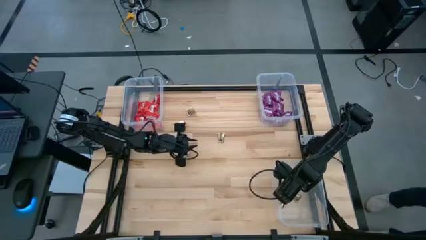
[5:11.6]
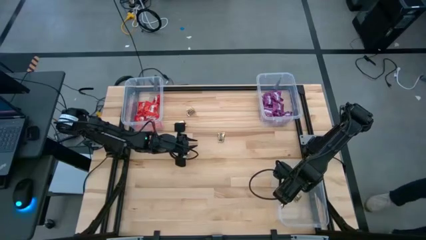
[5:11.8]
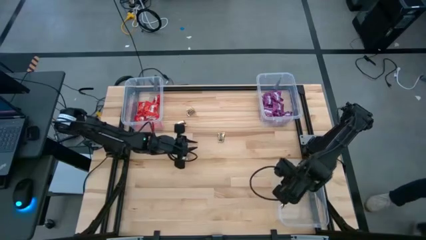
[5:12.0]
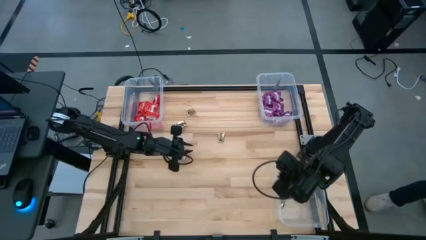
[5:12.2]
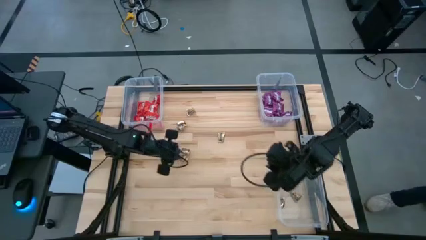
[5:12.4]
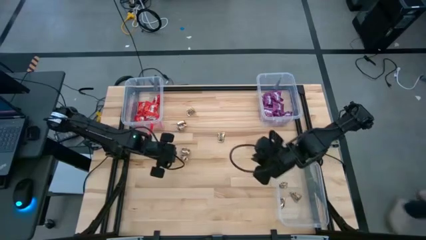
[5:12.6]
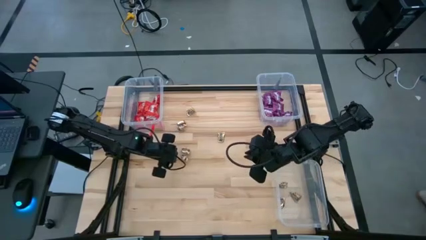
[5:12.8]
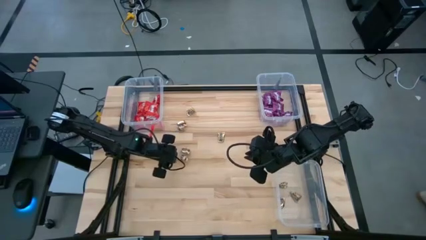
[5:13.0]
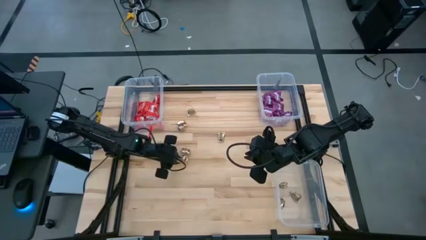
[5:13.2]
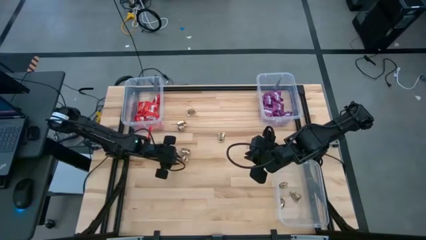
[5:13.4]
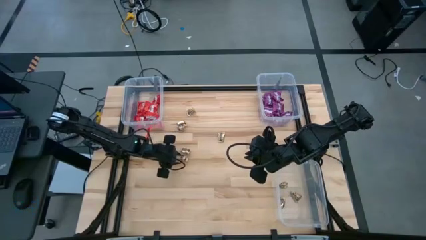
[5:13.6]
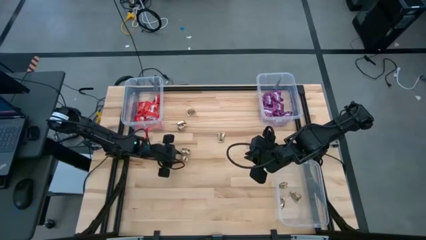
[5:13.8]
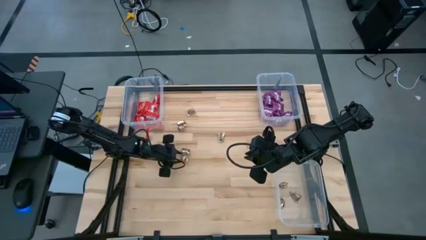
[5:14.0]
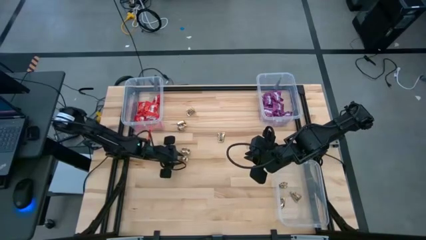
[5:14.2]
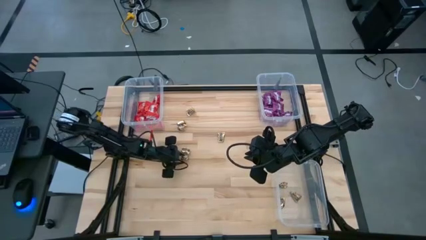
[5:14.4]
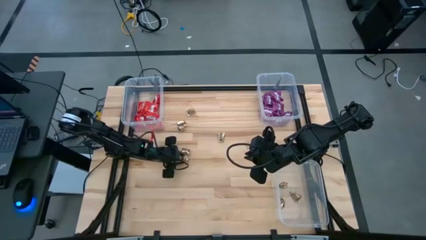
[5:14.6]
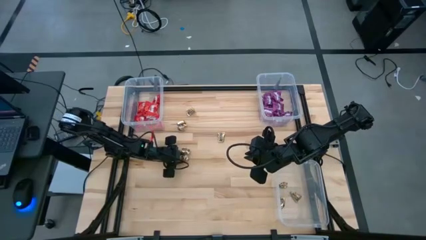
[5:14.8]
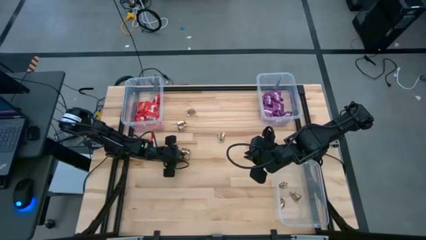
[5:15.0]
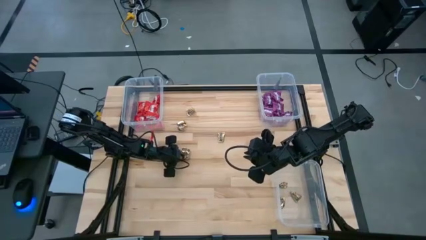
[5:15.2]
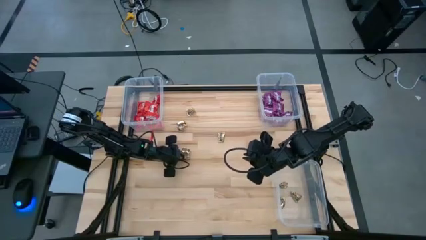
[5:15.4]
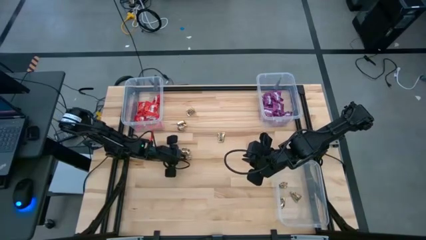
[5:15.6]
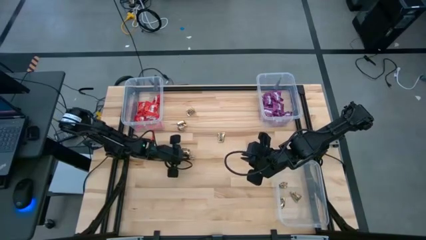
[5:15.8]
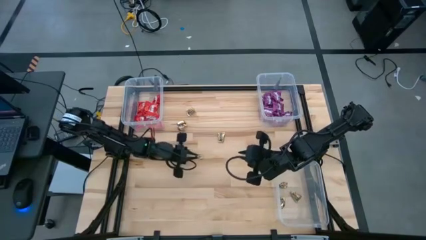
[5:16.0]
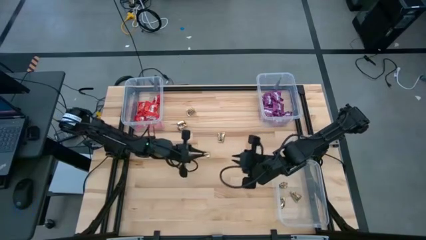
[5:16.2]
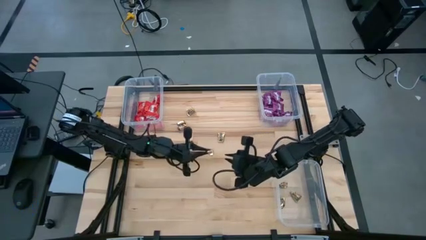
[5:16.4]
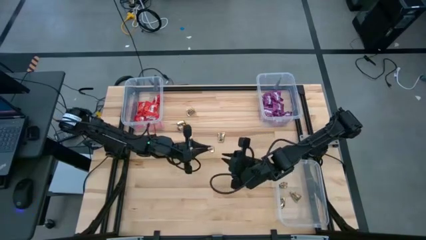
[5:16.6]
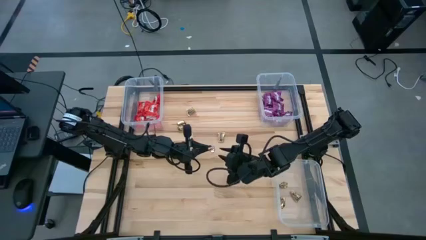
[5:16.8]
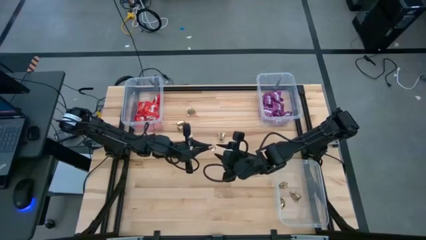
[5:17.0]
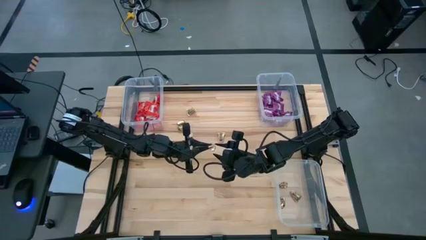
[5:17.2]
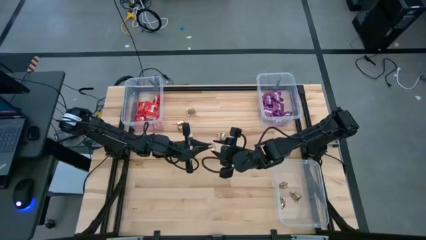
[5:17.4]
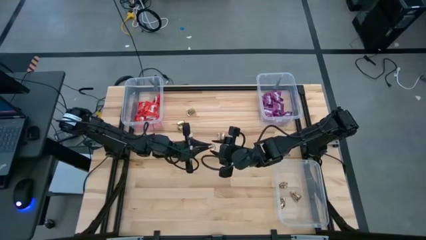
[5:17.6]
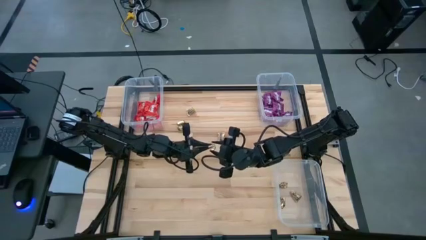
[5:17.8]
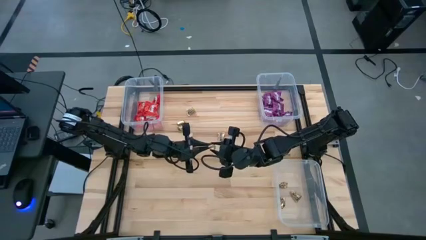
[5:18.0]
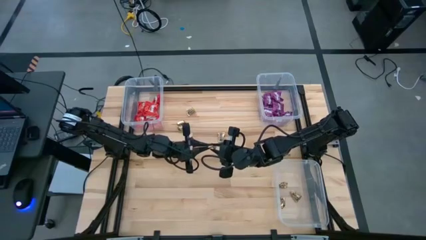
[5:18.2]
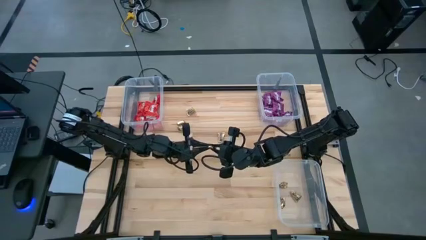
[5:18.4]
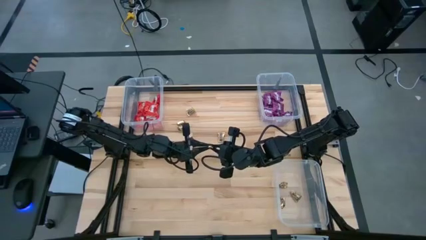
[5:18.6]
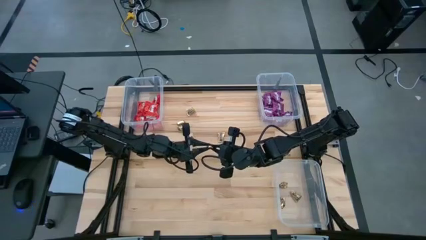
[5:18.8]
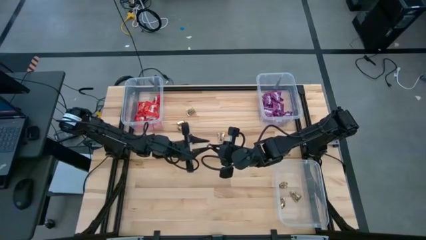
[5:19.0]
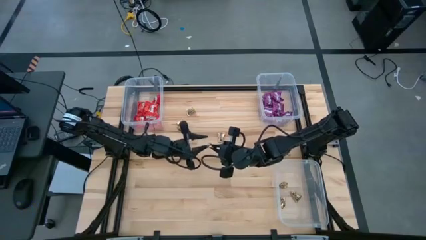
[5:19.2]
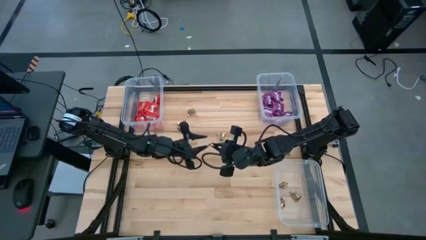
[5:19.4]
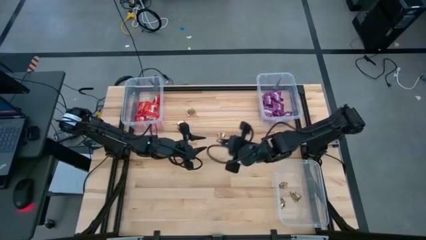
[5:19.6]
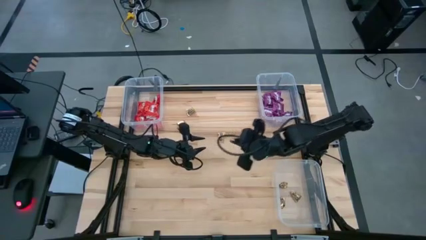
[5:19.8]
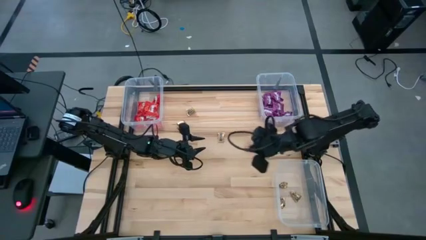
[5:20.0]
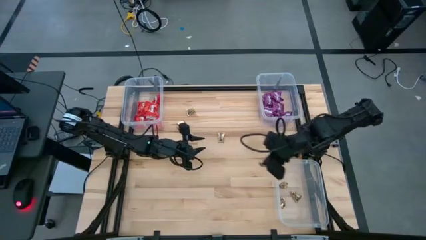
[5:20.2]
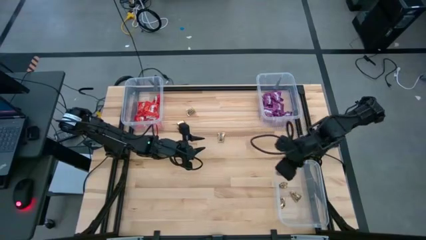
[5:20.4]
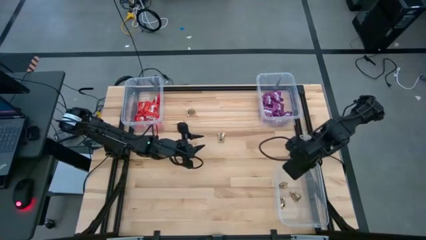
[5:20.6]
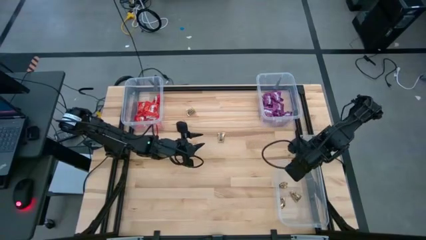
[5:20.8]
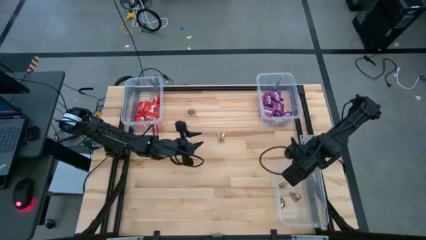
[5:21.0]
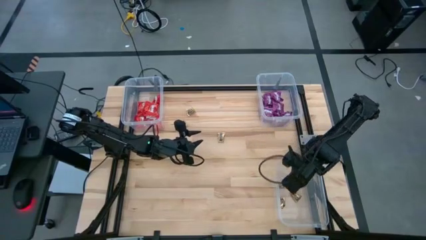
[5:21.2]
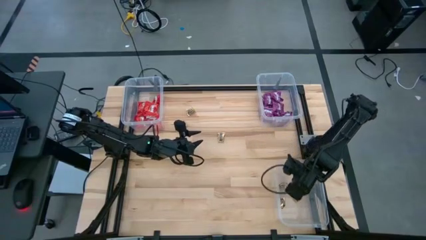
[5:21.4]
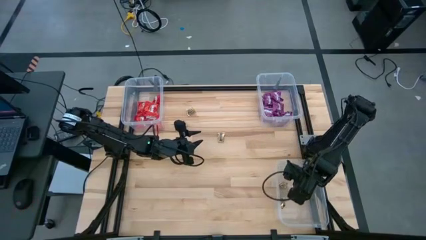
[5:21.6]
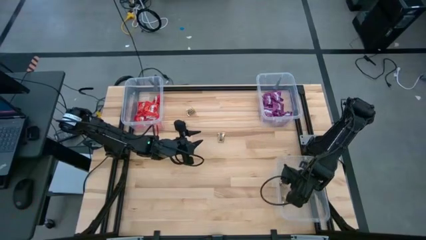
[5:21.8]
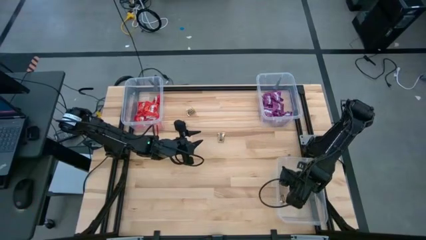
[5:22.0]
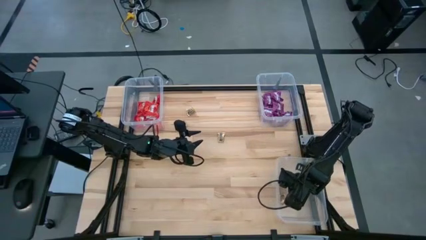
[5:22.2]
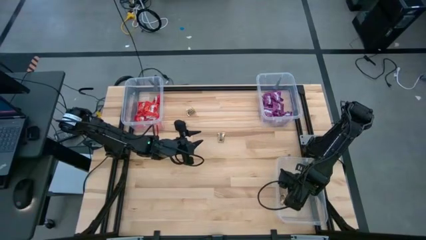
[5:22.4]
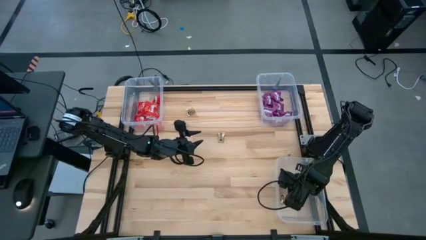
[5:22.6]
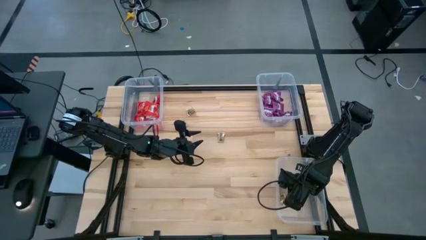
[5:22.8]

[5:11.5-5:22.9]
Task: Sort candy
Put the yellow candy into the bottom right transparent bin

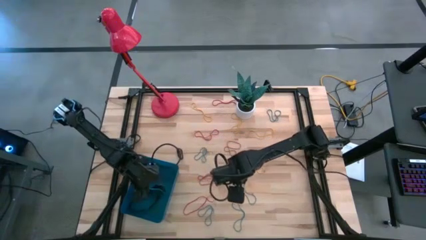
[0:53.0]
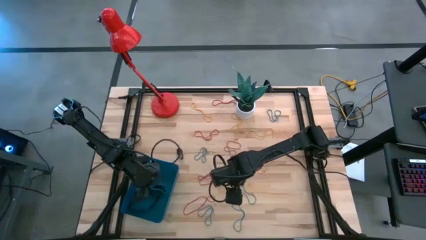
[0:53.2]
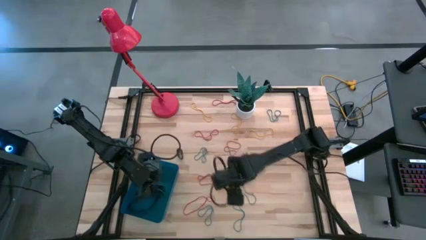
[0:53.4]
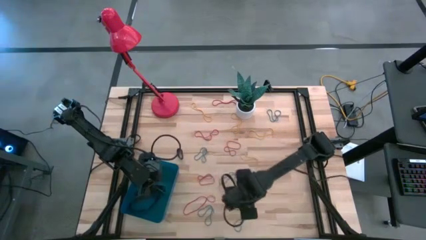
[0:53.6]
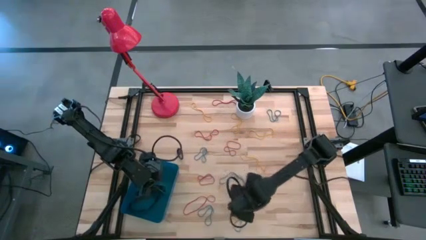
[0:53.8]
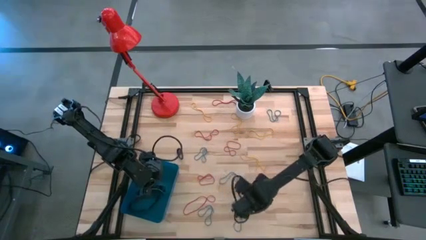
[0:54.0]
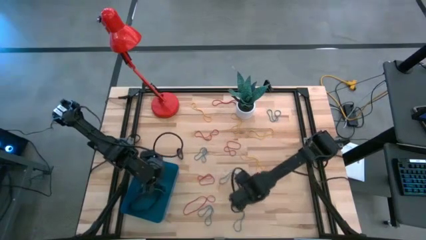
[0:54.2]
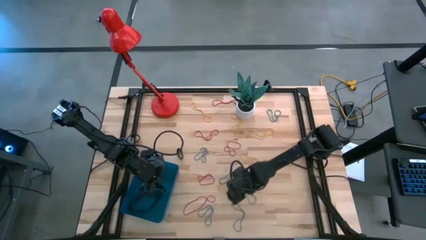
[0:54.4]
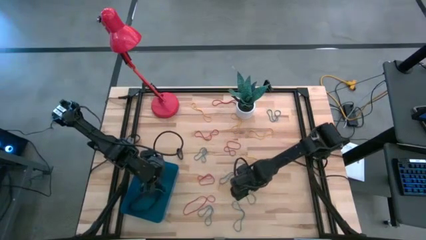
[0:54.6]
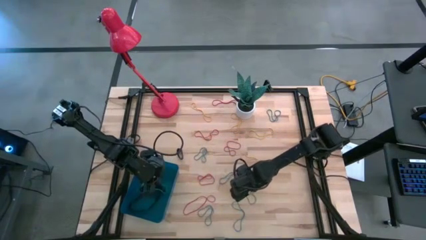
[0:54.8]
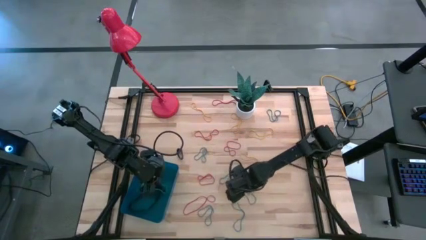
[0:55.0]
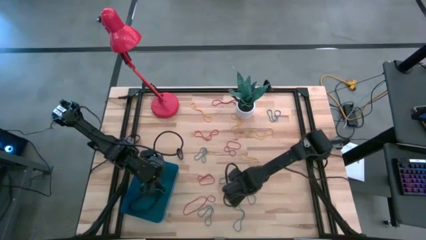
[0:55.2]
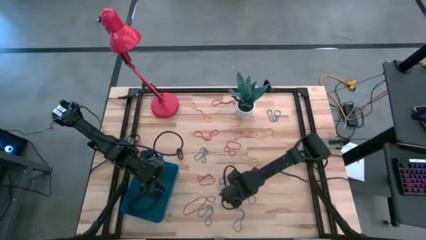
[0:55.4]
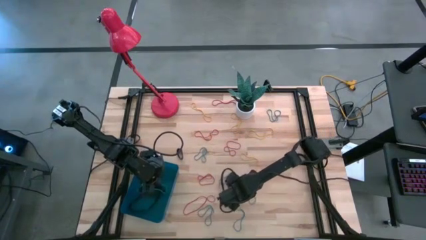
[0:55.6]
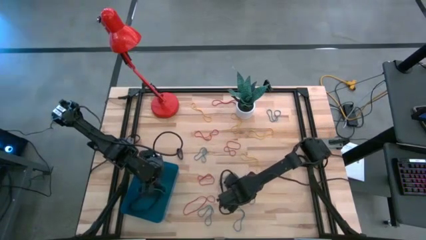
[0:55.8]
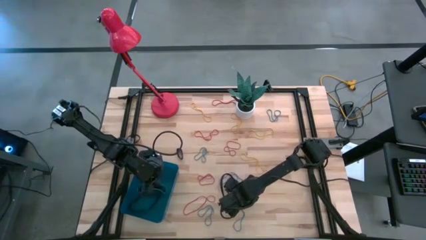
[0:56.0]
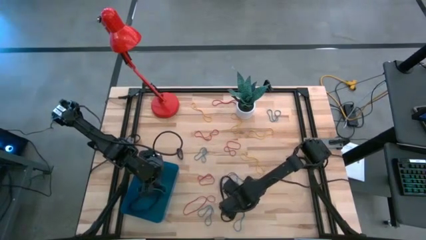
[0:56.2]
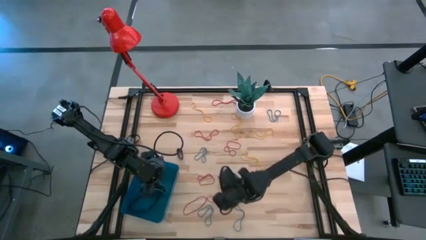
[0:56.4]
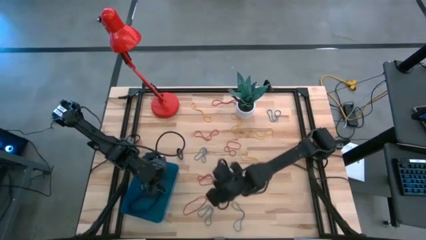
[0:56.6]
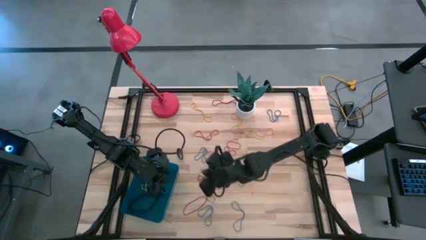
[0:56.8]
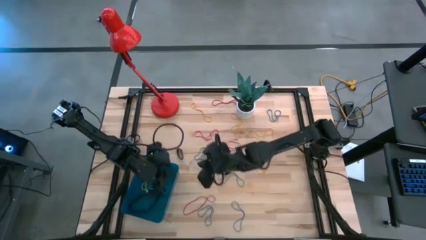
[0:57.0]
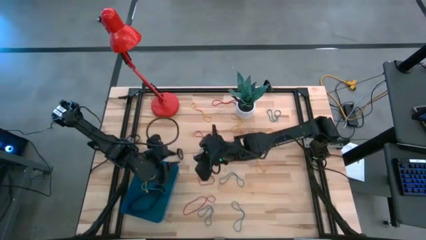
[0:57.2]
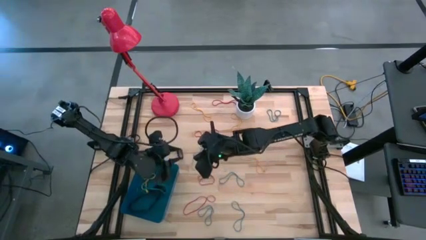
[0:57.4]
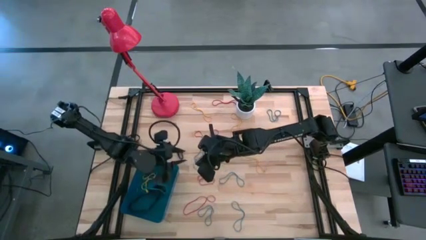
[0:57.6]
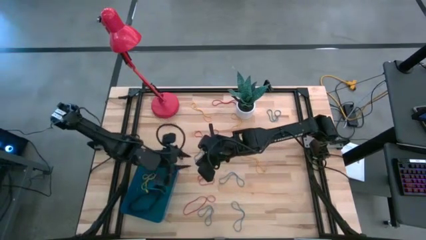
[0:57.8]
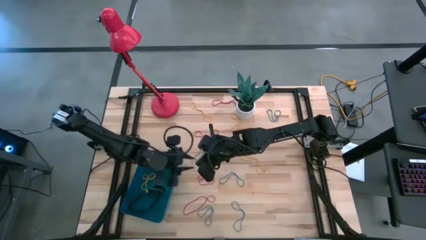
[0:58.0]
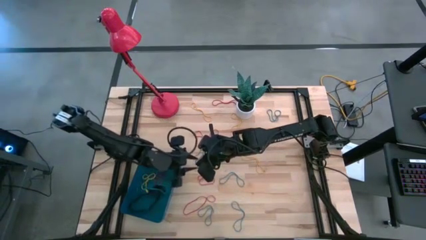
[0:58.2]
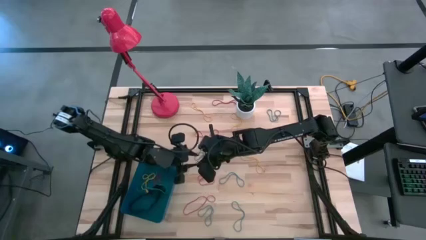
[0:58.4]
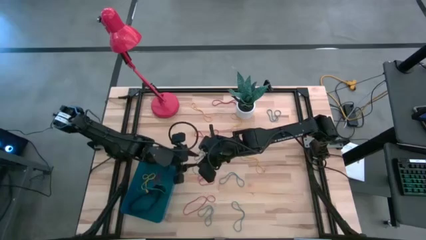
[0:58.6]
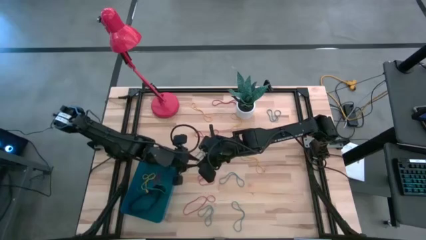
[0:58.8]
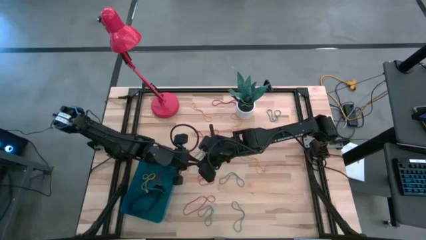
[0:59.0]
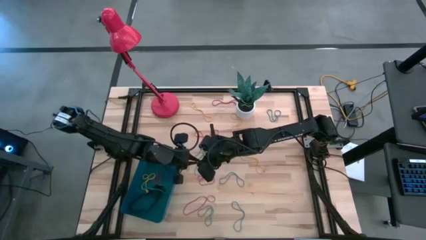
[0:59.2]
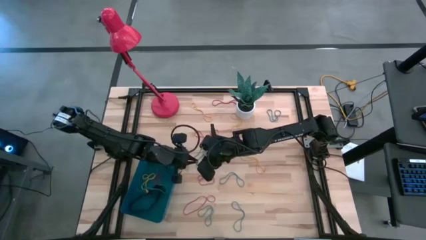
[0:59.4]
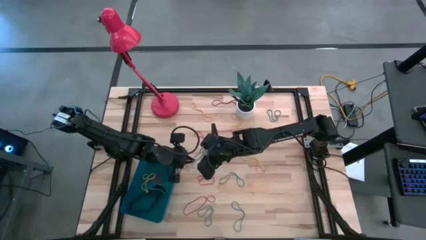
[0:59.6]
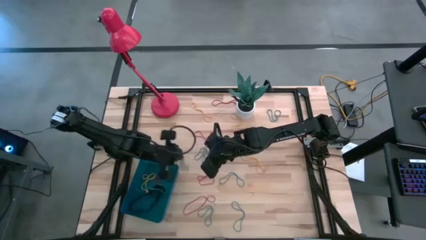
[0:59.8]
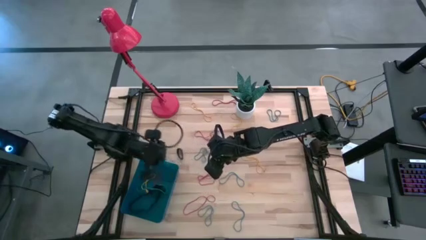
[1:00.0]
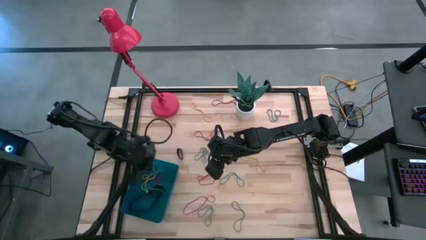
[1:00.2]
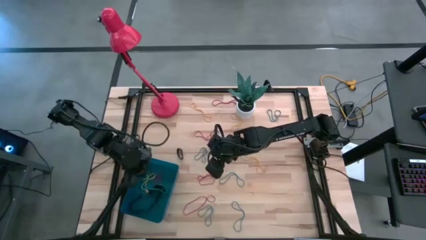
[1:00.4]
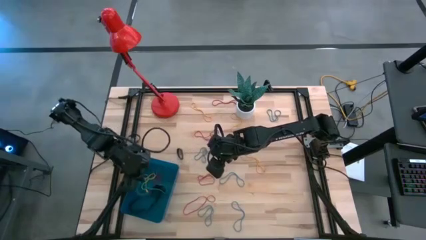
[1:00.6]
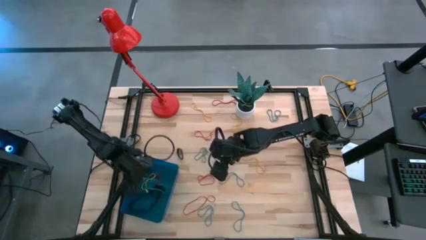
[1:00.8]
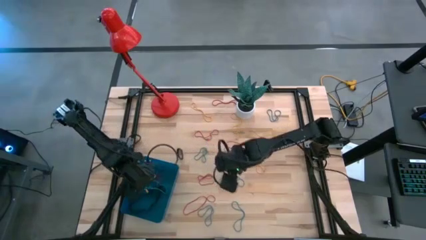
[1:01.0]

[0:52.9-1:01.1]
Task: Pick and place rubber bands into bin
Put the blue rubber band into the blue bin
